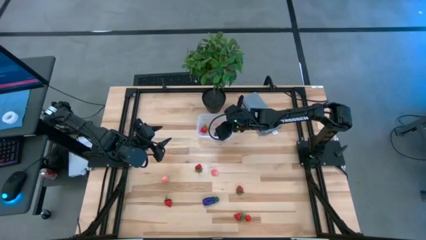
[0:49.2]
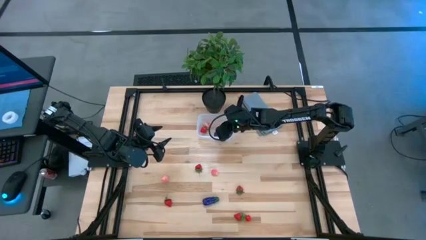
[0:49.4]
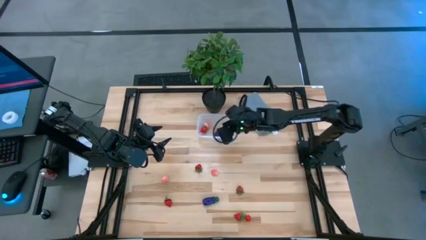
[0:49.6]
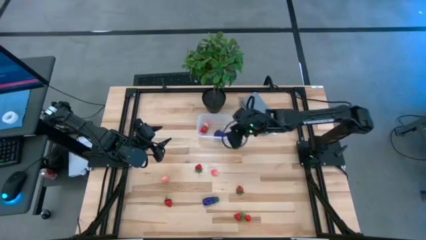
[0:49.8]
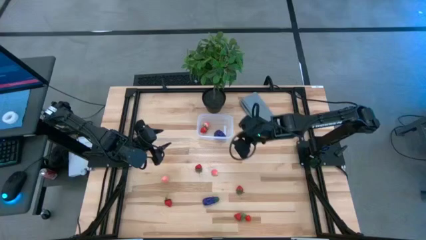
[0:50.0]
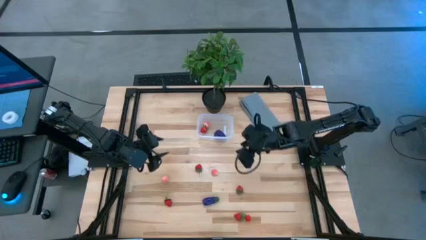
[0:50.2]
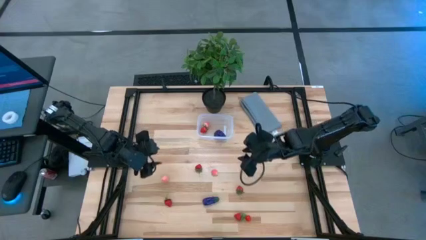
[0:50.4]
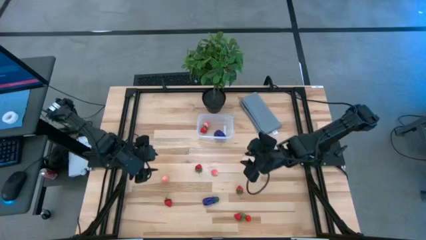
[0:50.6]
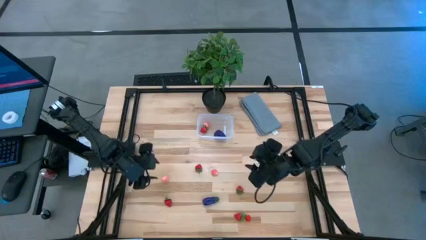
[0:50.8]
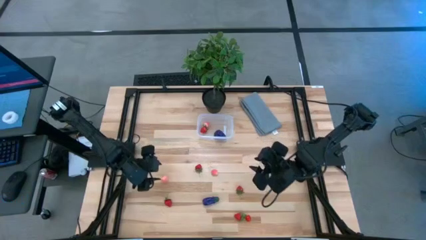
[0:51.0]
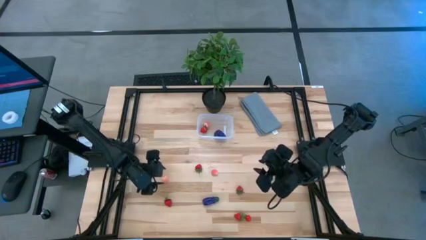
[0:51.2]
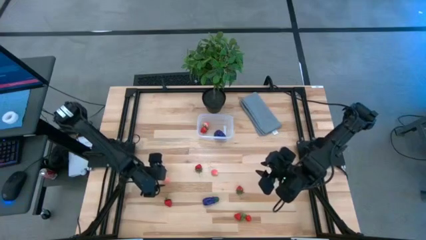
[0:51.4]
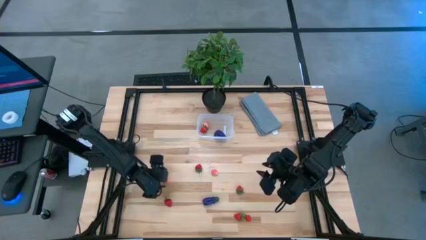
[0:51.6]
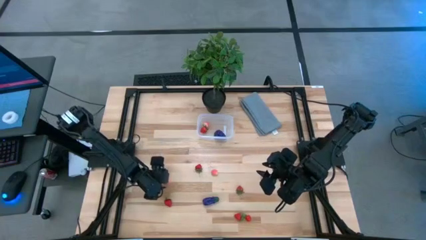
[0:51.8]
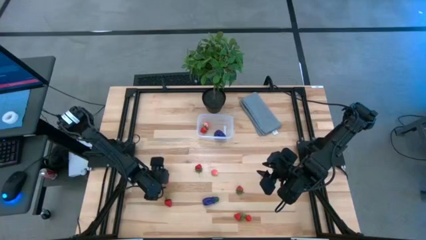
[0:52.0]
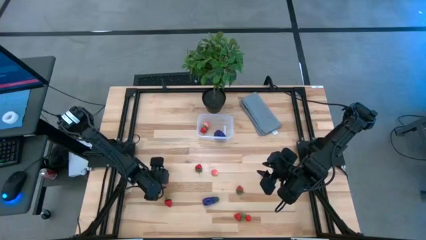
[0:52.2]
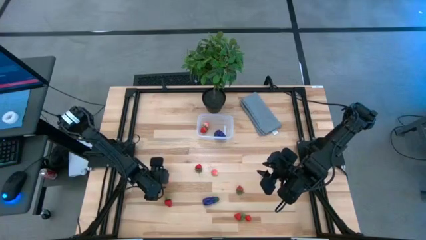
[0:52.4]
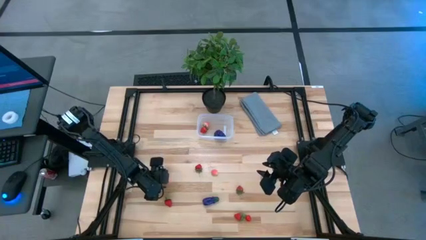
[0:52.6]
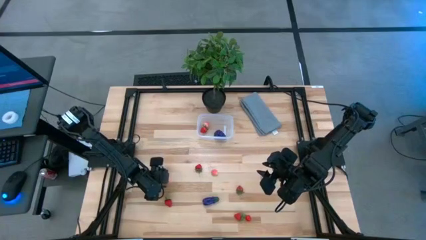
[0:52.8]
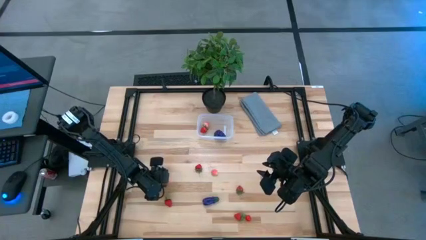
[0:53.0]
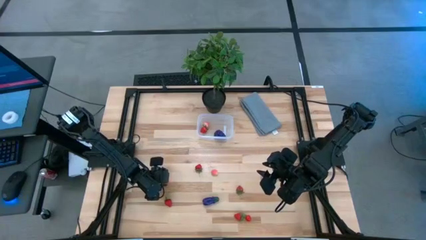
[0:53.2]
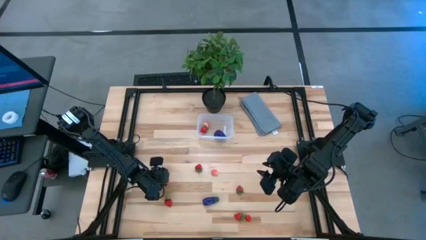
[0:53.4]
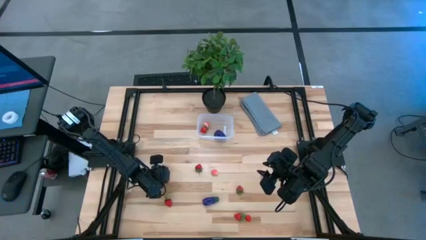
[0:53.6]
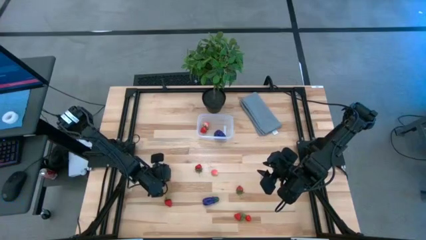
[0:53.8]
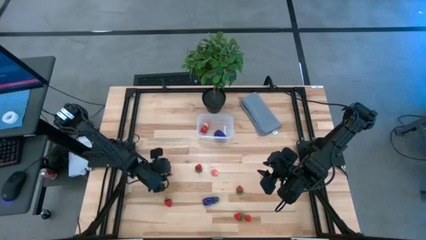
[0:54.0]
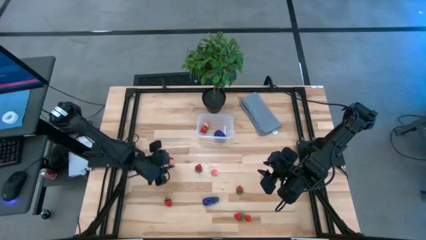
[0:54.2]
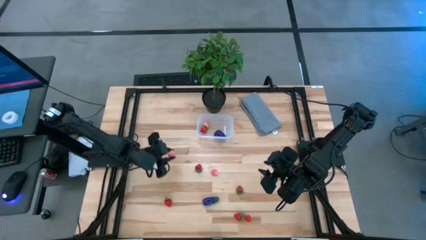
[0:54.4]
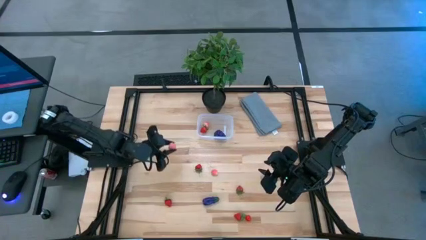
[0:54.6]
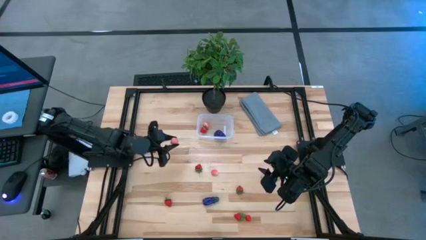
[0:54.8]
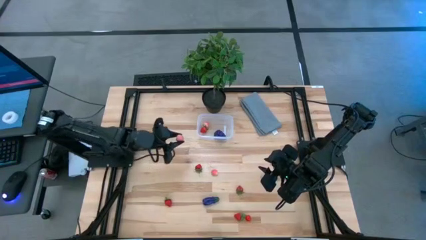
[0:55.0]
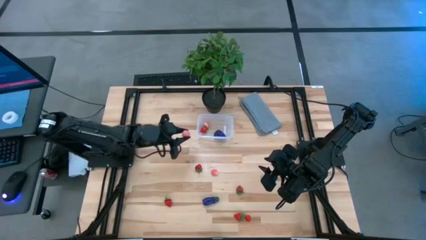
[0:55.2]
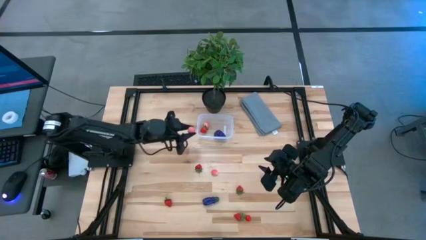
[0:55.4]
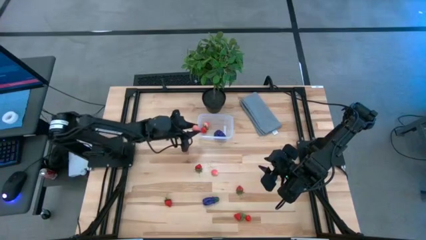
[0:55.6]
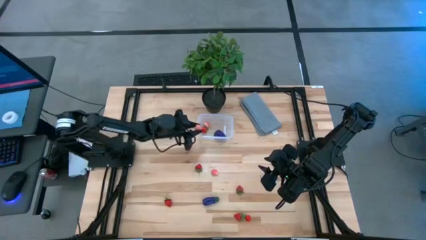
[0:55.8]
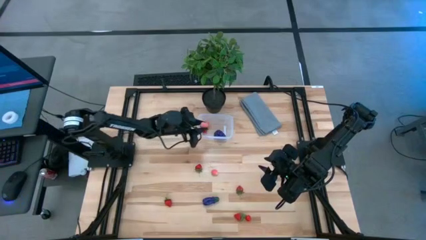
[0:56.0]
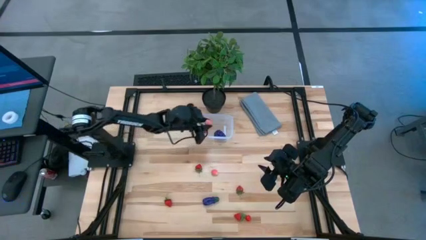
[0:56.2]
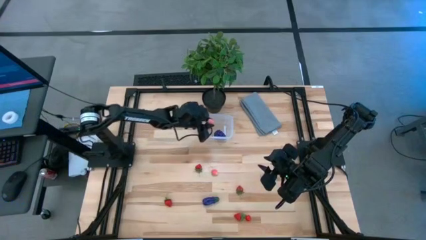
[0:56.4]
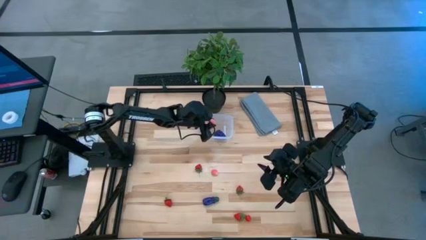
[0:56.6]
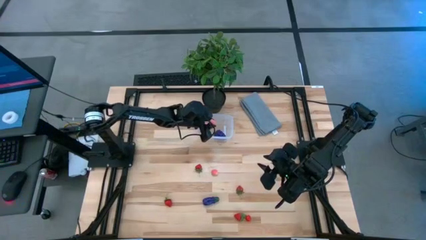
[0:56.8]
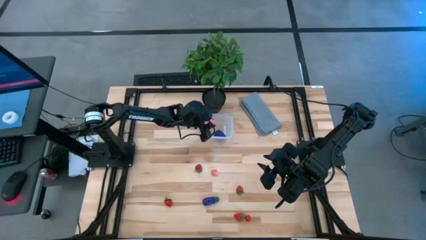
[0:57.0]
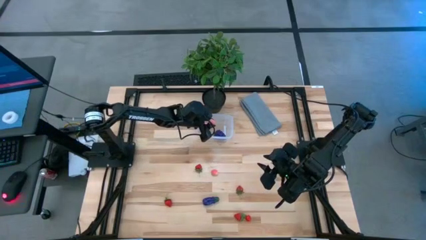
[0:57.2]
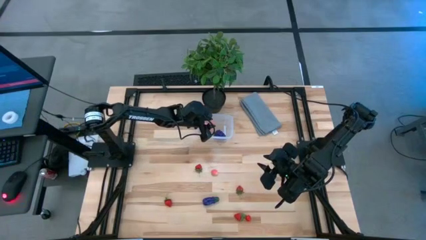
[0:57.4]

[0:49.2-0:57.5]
Task: Pick and placing Produce into tupperware
Put the left pink peach into the transparent bin

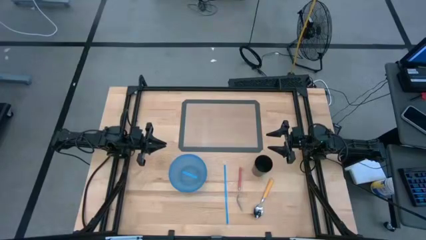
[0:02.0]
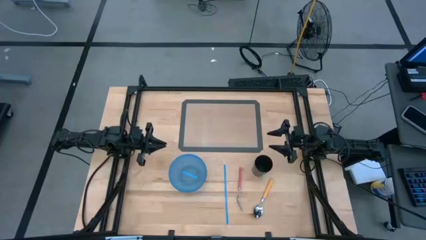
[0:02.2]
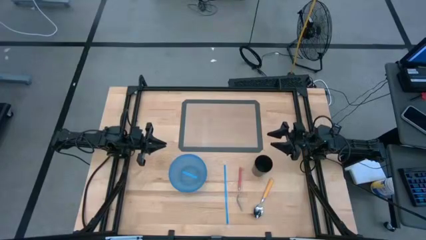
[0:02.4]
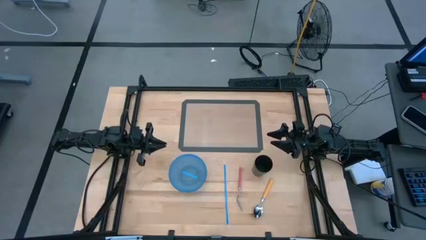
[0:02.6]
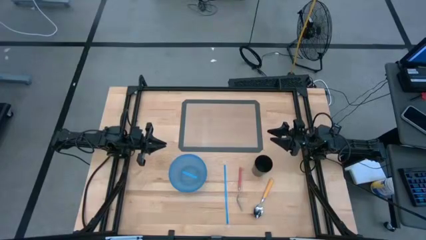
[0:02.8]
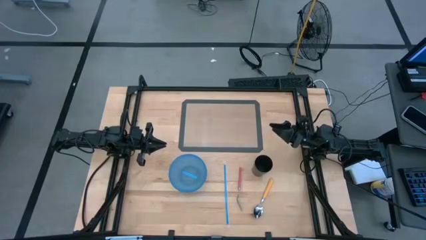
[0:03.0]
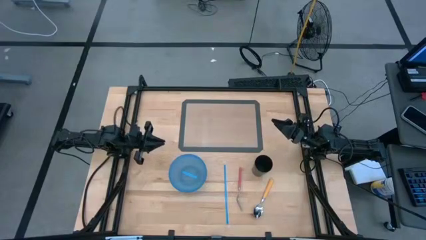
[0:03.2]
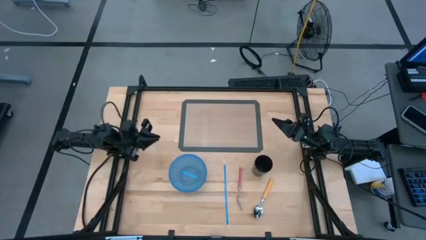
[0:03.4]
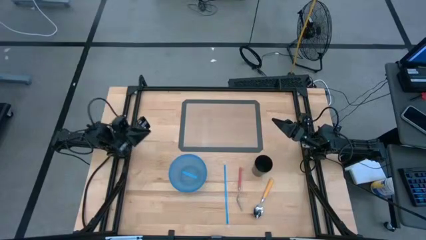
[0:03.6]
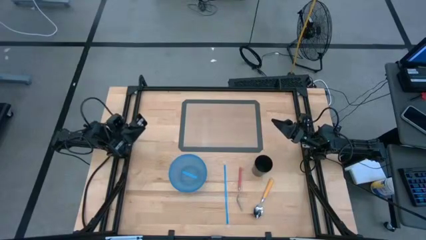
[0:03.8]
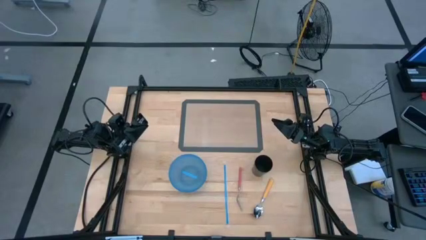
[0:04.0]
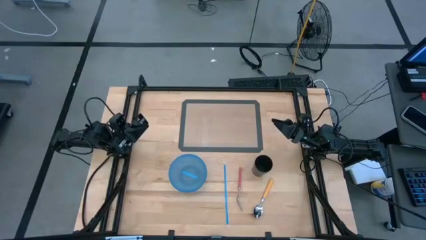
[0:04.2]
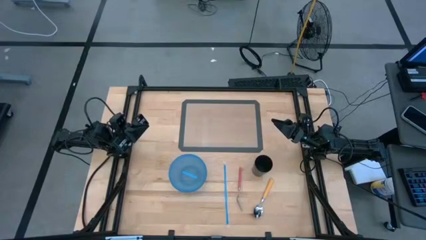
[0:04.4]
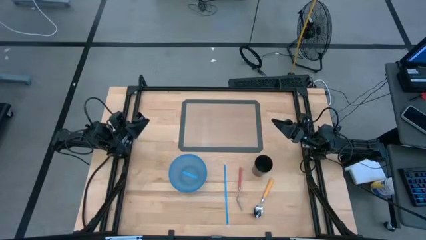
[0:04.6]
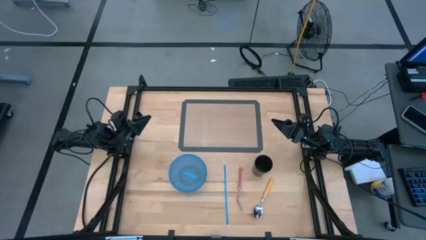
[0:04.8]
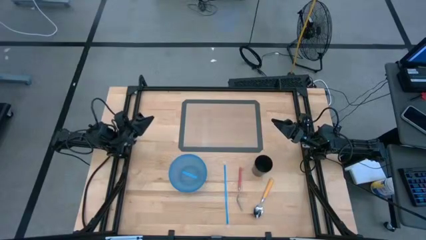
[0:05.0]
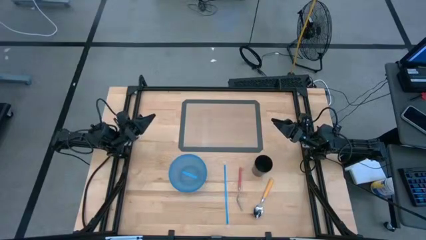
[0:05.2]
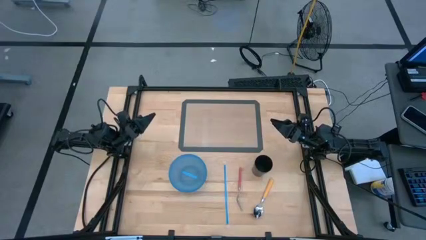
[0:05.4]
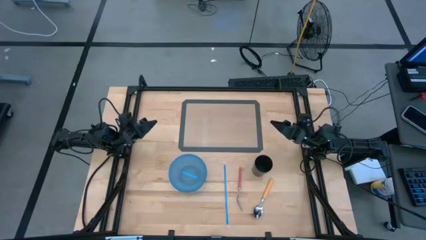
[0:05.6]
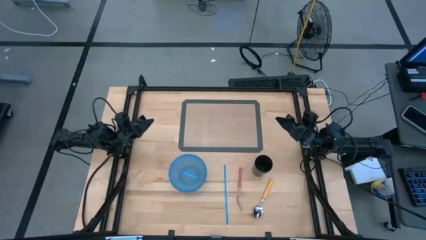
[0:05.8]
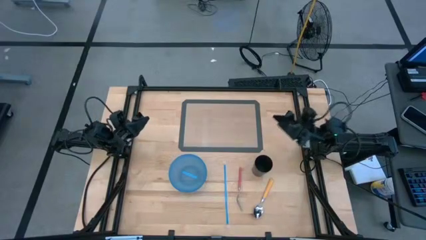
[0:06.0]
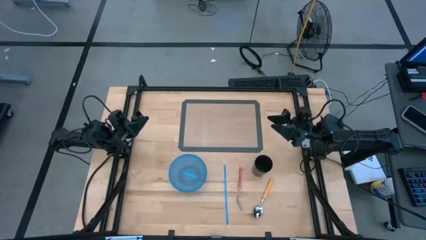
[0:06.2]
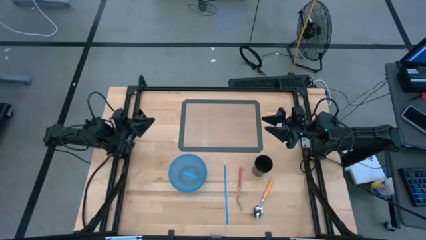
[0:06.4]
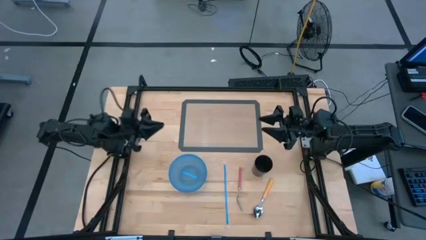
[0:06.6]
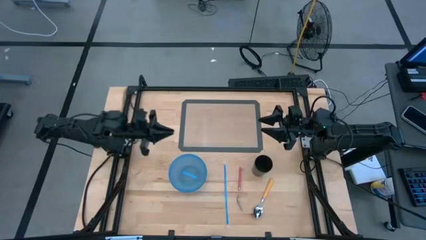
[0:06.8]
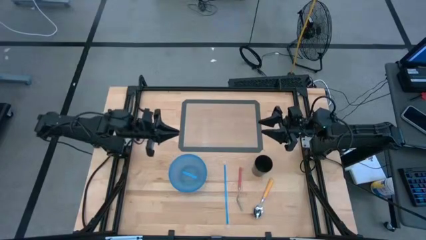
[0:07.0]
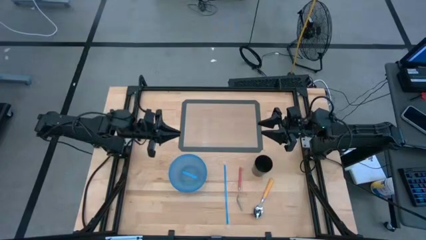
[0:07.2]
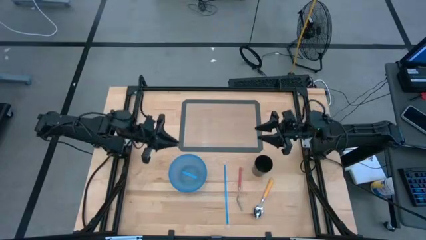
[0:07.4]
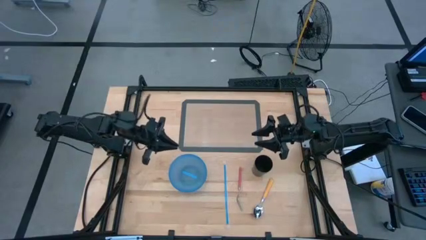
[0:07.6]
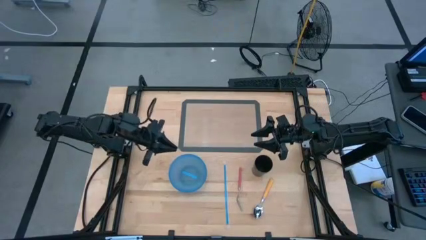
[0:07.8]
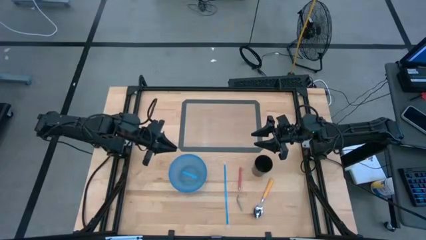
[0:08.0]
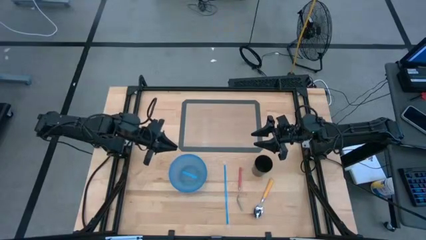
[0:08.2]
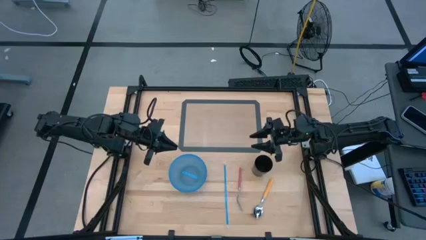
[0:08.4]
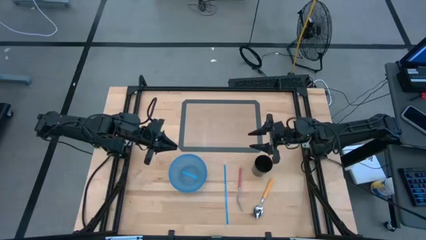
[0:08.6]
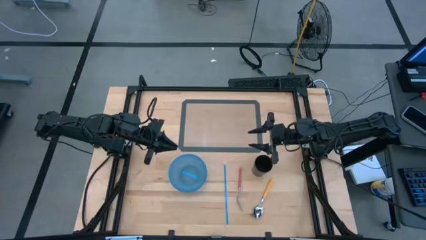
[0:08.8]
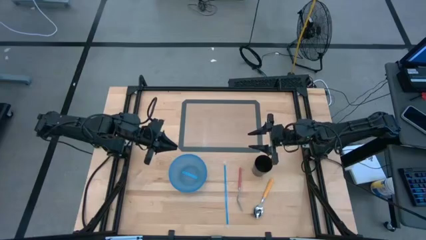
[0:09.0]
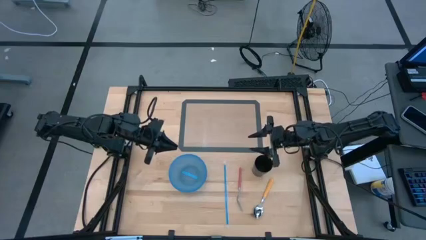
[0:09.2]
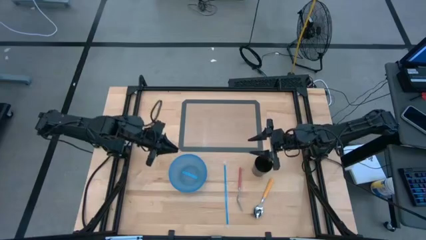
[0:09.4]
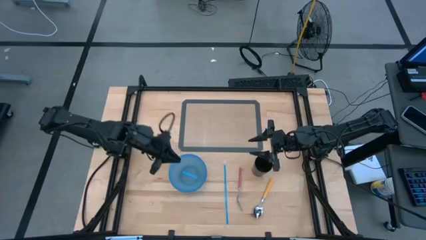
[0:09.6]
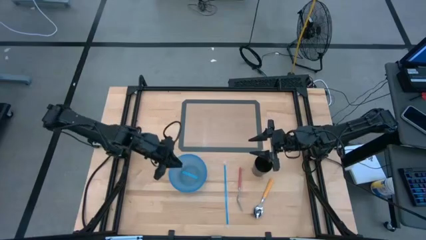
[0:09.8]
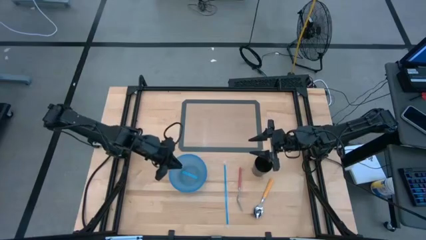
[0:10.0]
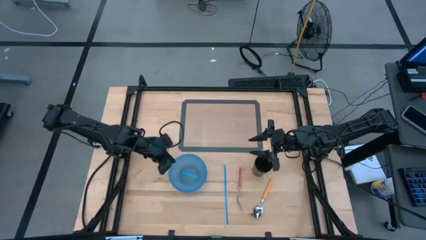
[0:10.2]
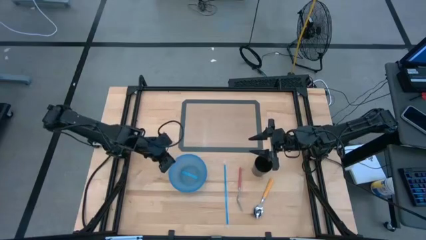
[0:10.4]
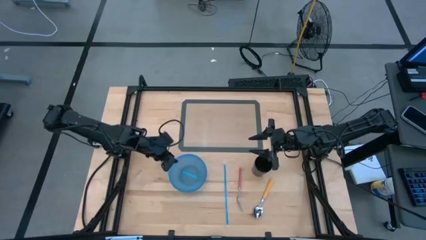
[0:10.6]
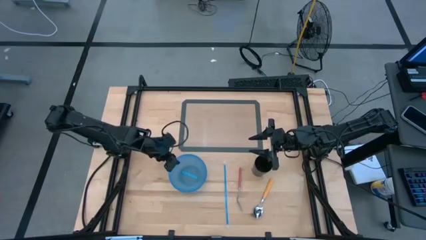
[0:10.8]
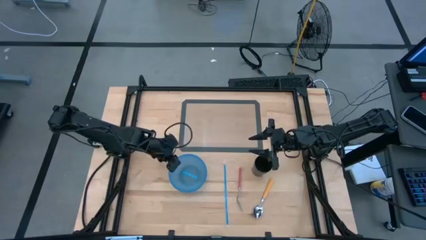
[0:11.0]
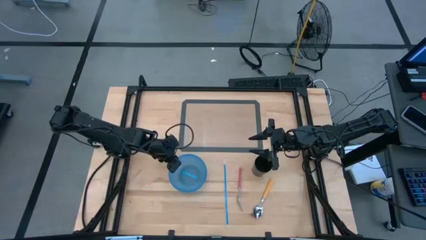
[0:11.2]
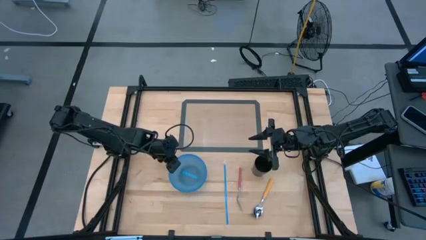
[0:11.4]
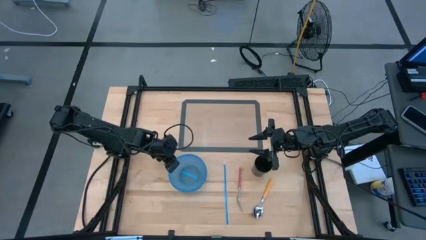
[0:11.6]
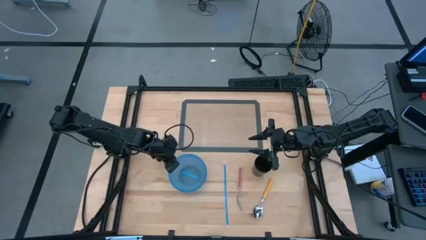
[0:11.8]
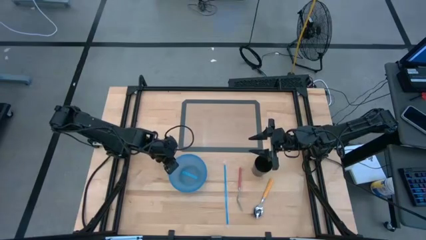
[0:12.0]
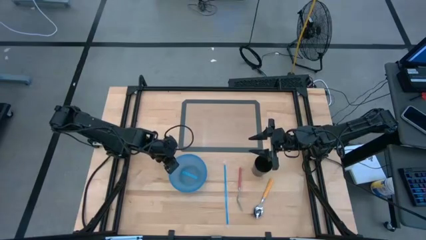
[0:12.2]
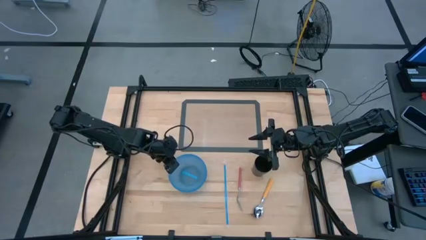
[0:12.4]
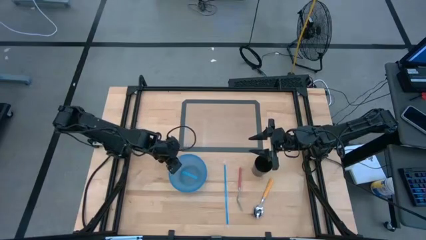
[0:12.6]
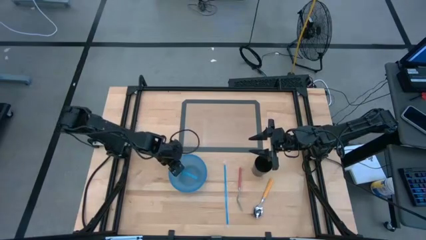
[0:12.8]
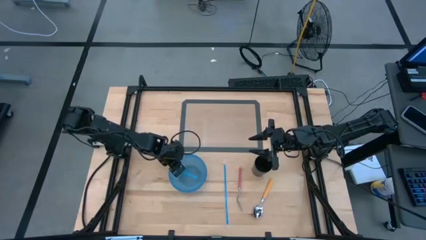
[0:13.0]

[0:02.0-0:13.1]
Task: Pick & Place Utensil
Put the blue bowl on the left side of the placemat
